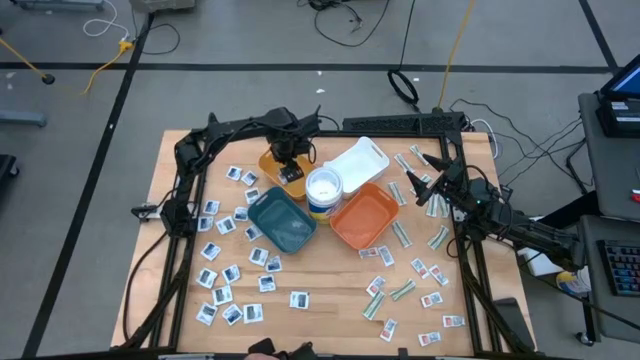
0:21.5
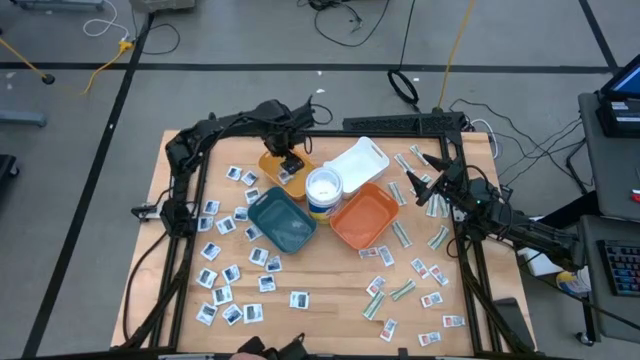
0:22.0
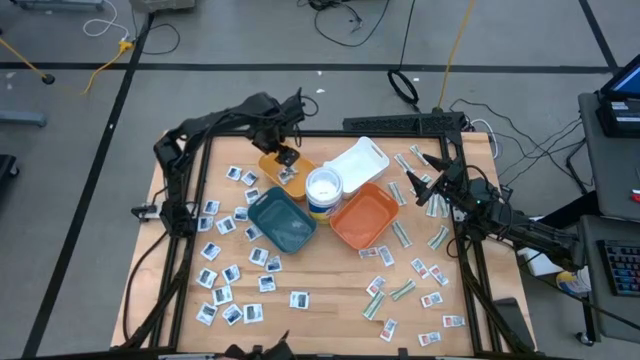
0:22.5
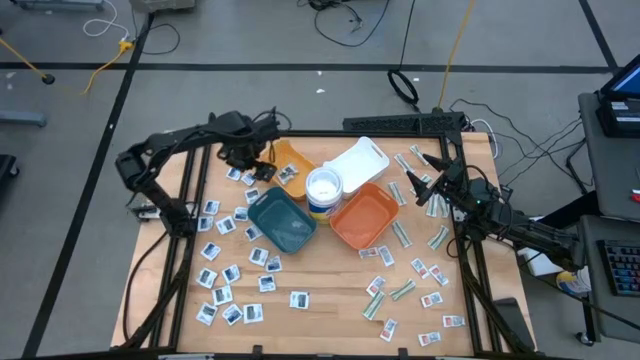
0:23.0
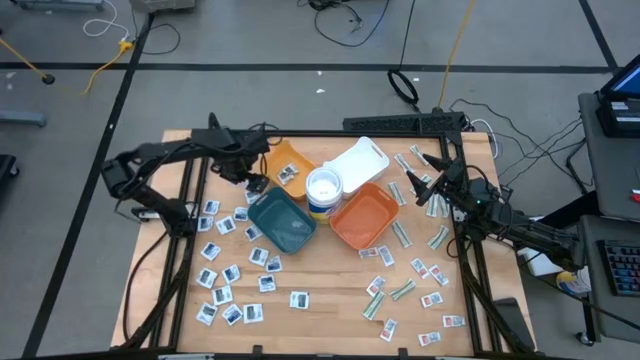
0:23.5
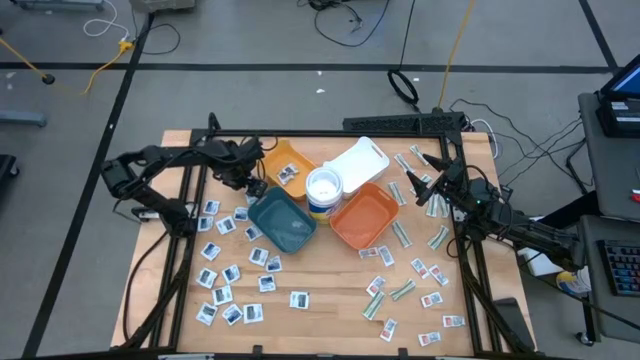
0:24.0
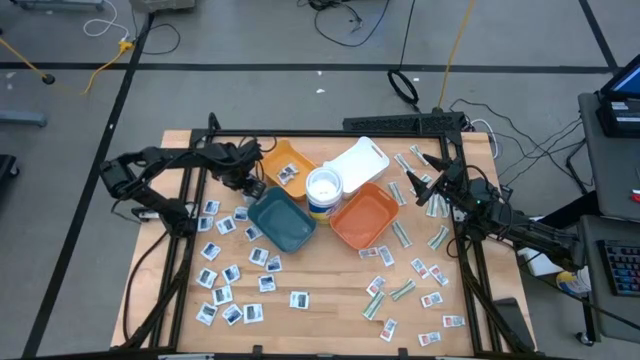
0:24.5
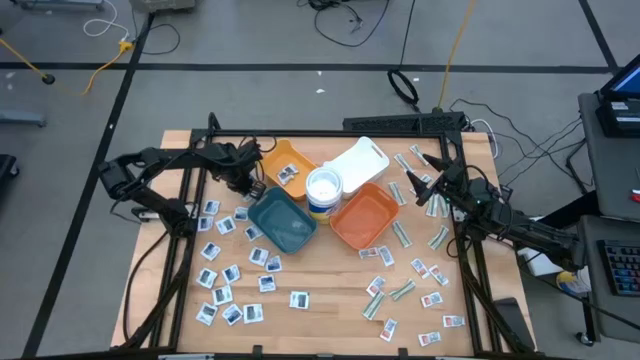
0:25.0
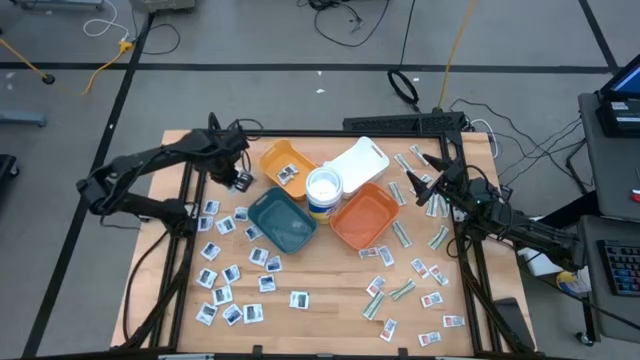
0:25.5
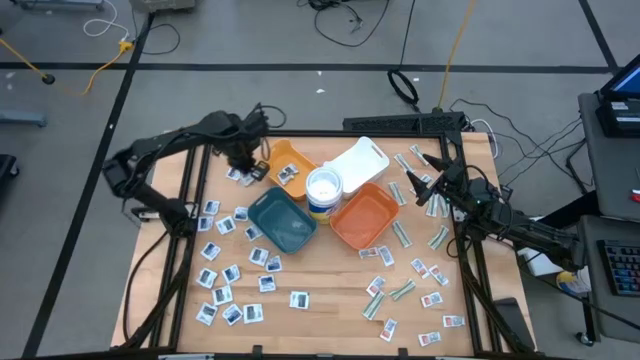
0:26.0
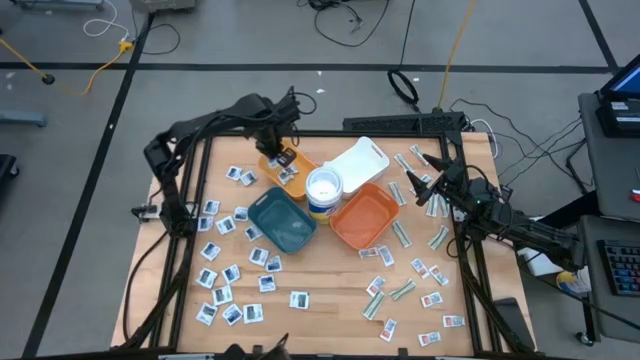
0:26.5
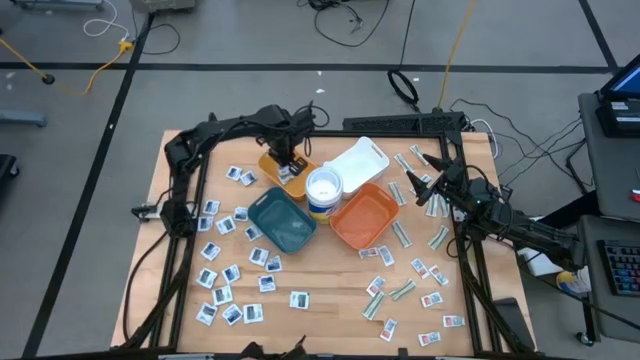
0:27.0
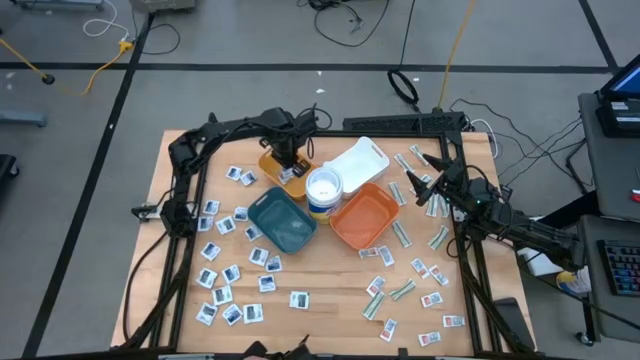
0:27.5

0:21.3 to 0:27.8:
Task: Pick & Place First Aid Supplies
Put the black pad into the yellow bin

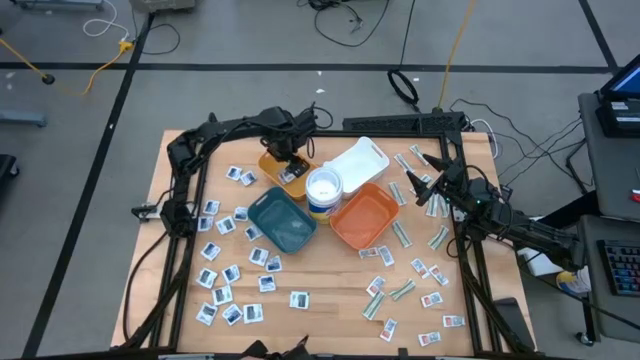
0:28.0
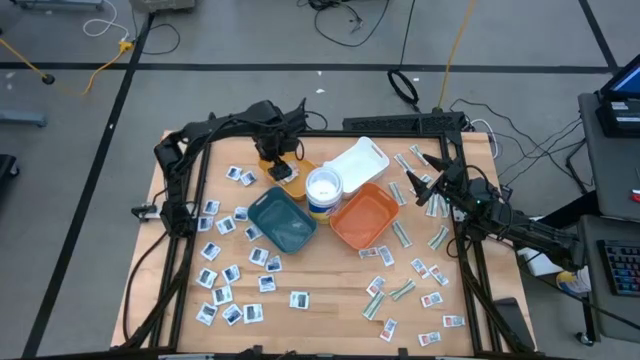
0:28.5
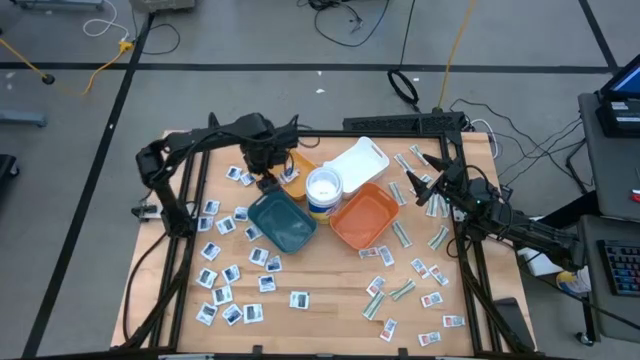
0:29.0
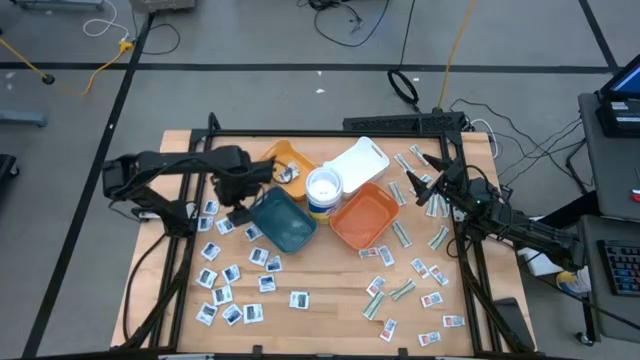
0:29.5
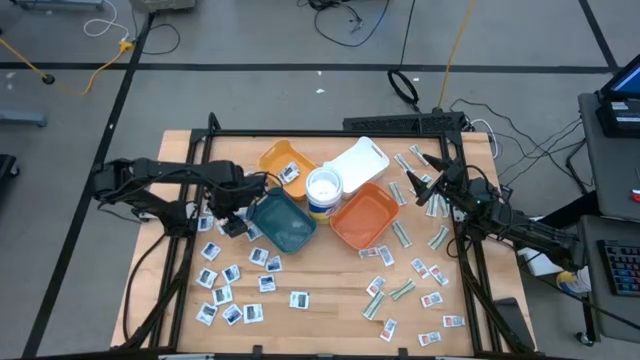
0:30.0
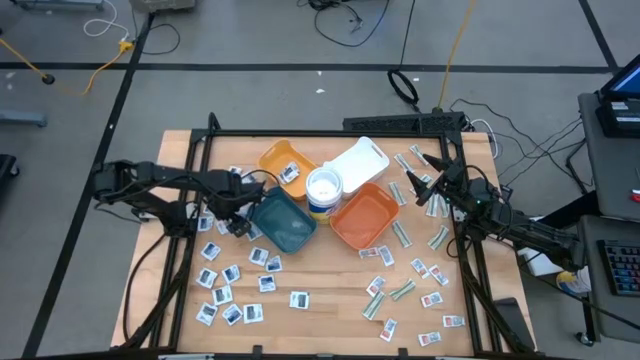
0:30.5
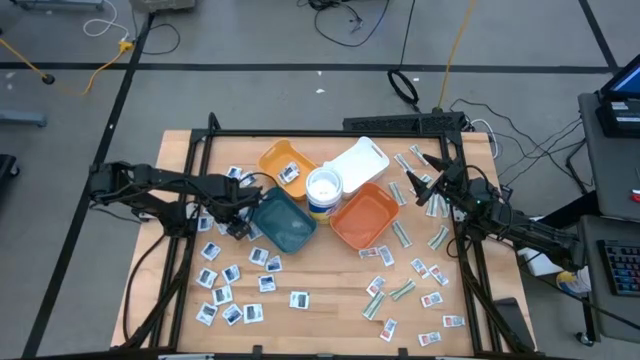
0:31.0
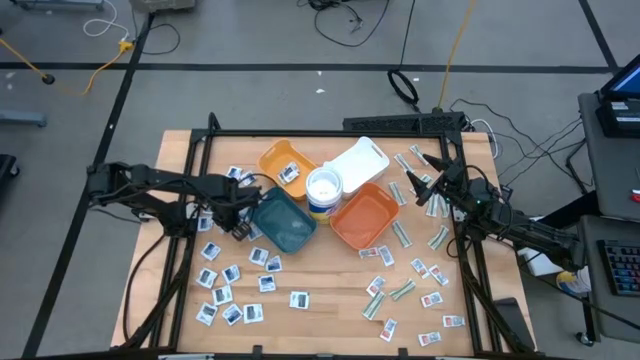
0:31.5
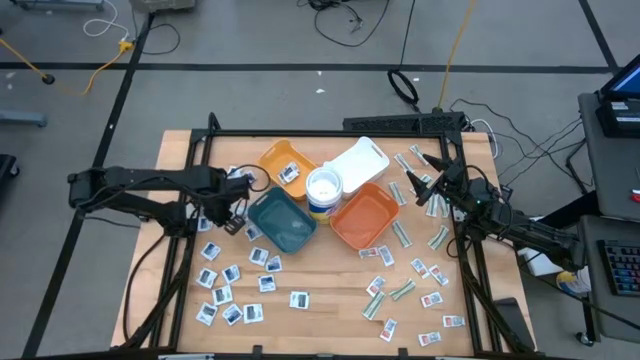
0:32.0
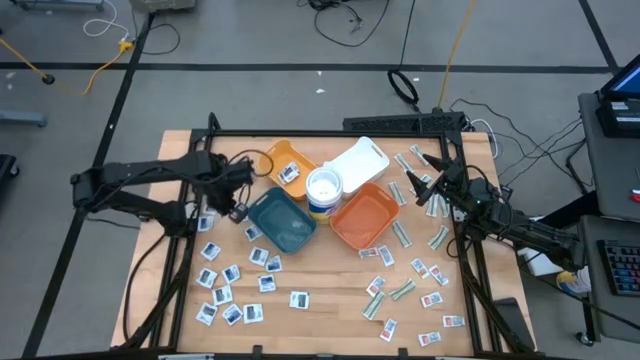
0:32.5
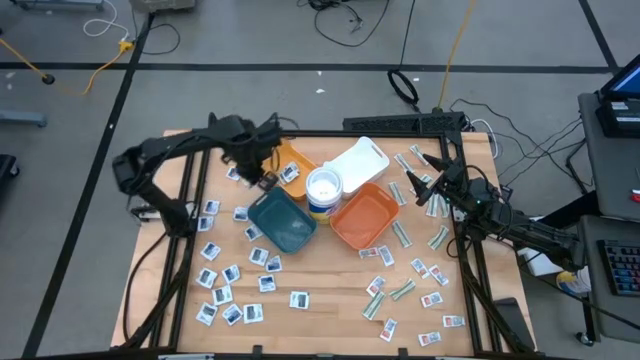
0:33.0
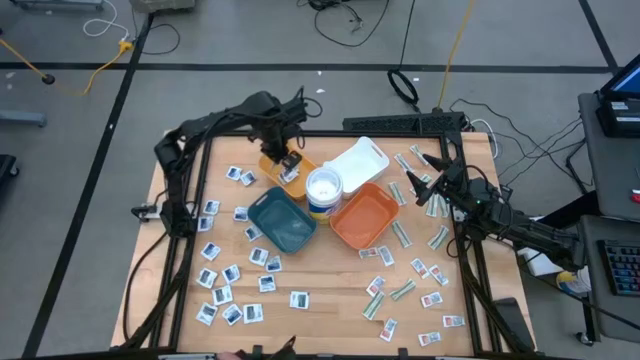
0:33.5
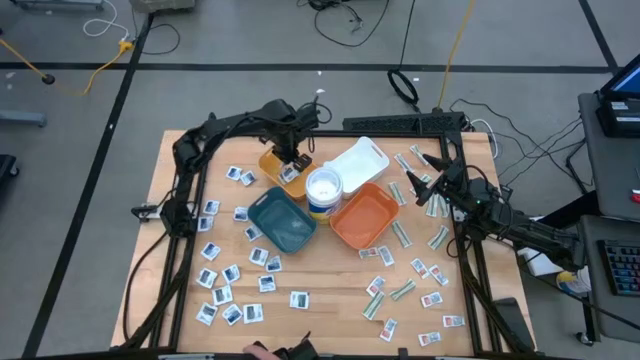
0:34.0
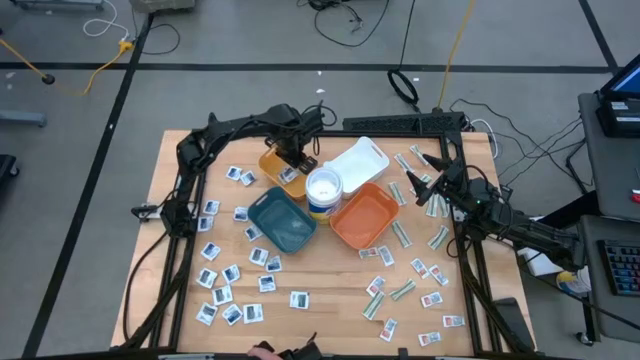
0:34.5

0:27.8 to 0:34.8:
Put the black pad into the yellow bin

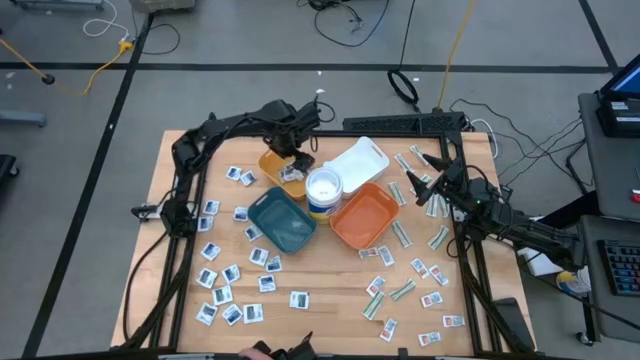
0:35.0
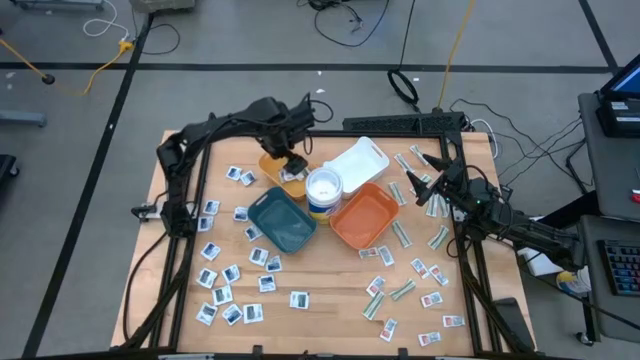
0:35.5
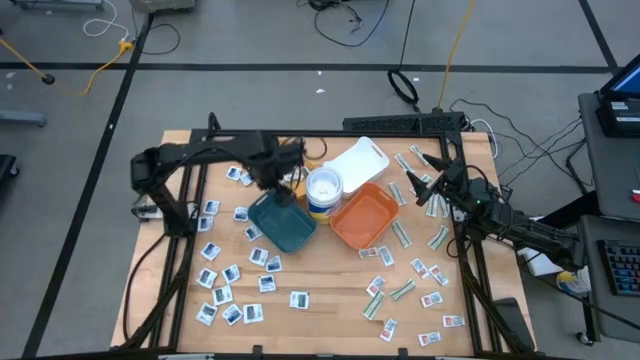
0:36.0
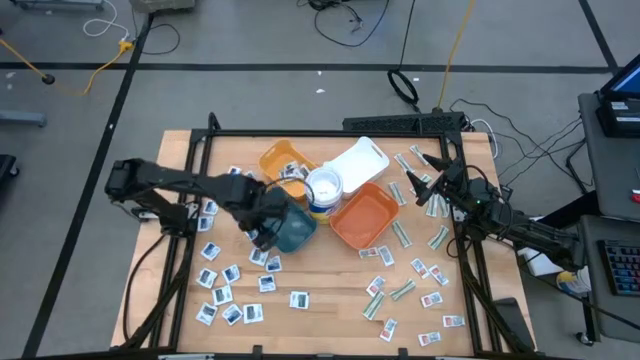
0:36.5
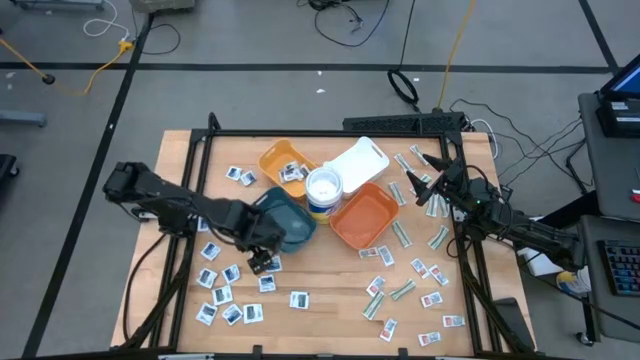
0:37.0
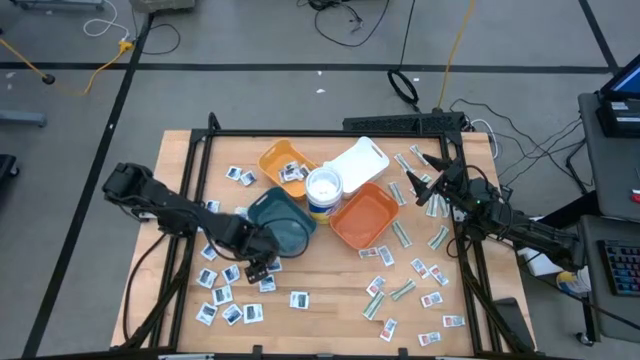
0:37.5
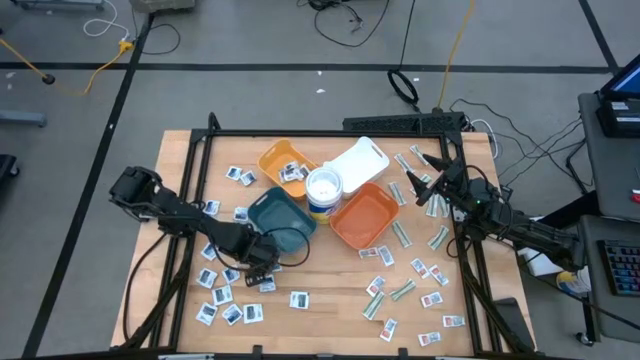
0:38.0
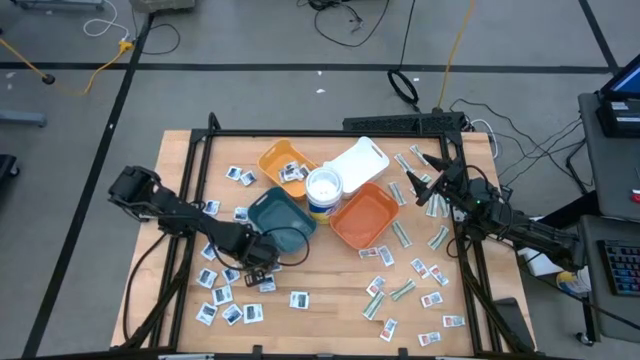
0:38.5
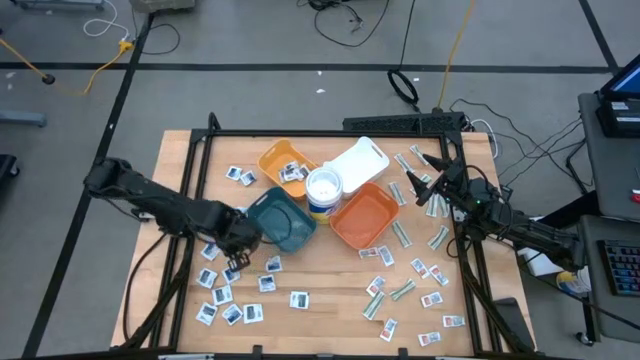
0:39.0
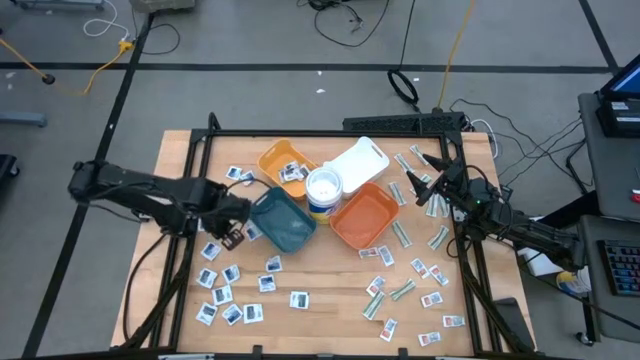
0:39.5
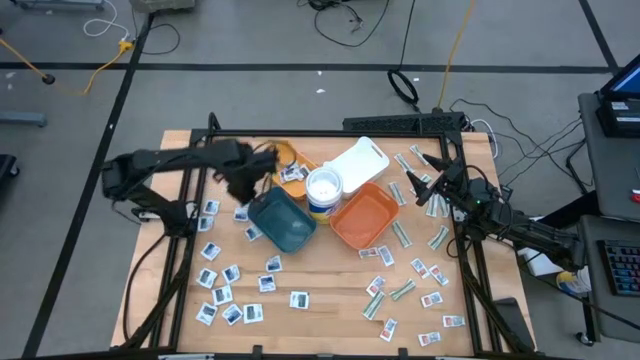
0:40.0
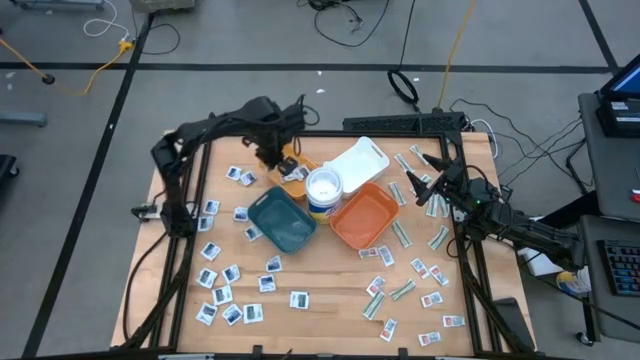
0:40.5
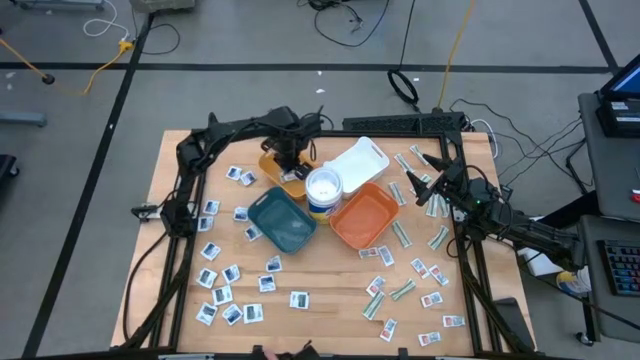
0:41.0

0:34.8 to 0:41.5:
Put the black pad into the yellow bin

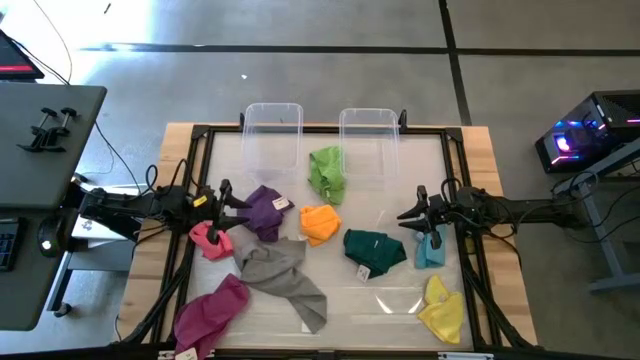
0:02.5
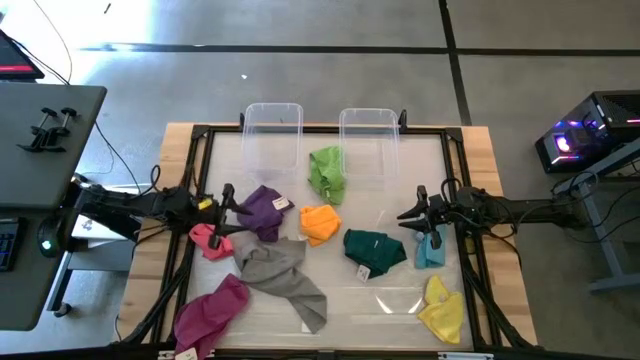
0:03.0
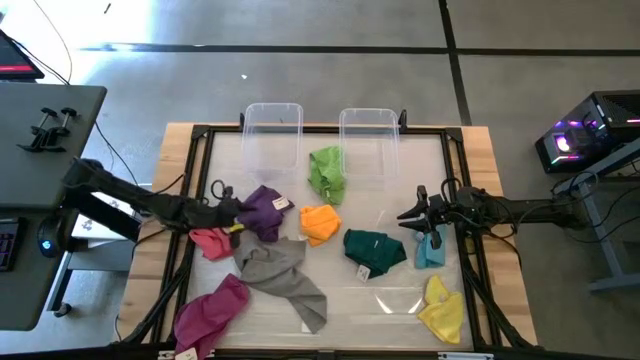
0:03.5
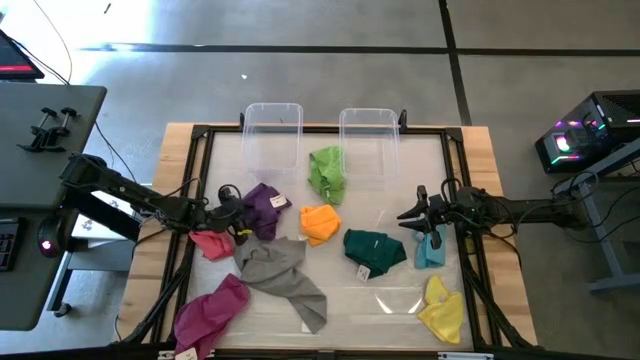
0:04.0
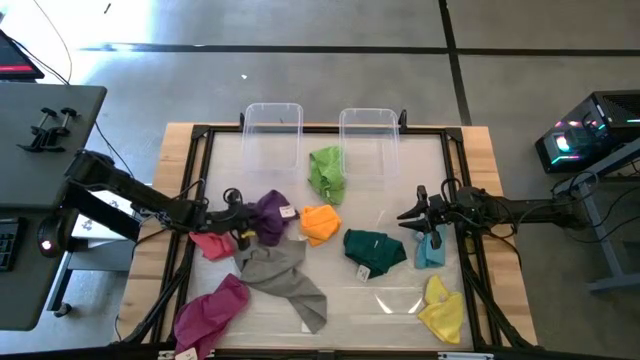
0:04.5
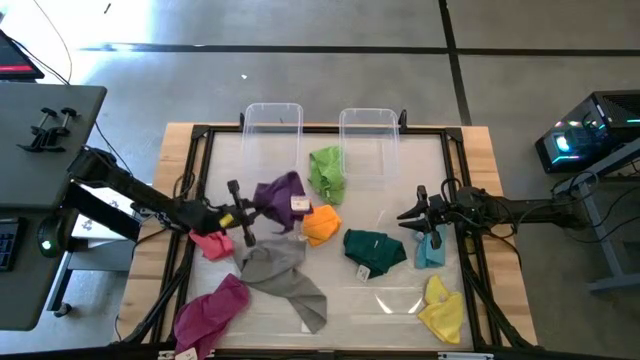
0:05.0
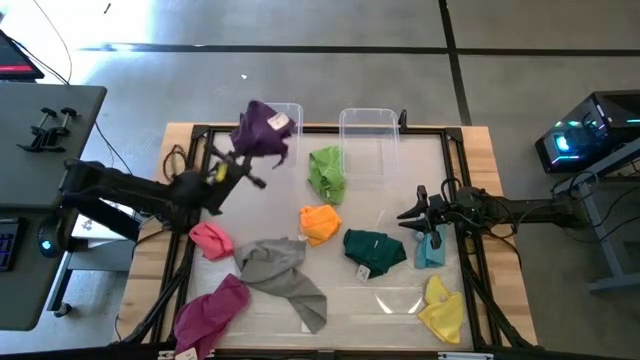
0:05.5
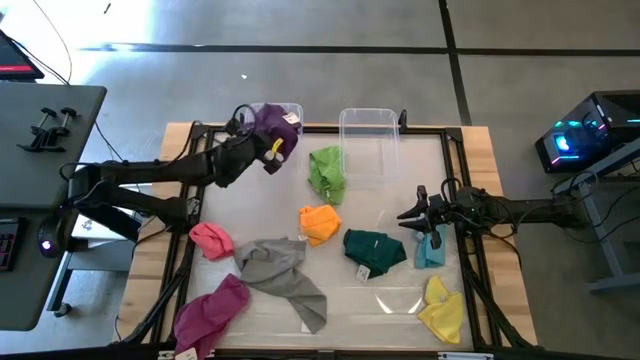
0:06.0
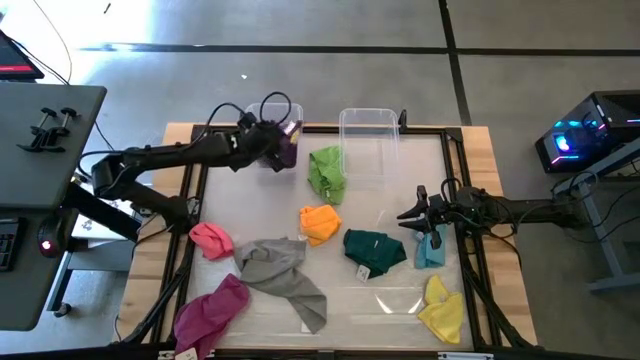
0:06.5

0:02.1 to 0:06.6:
Task: Sort towels by color in basket
Put the violet microfiber cloth into the left transparent bin
